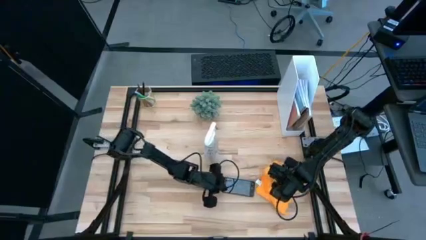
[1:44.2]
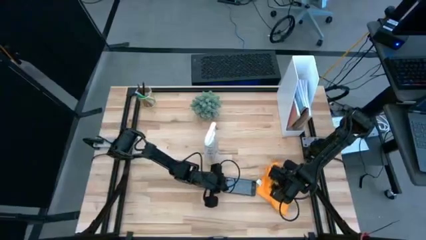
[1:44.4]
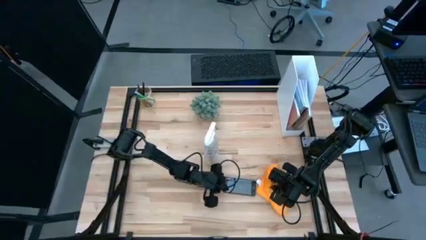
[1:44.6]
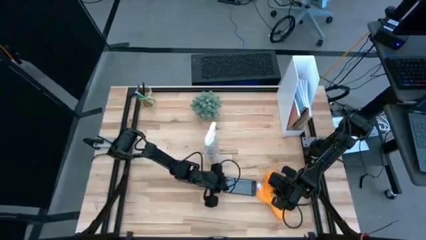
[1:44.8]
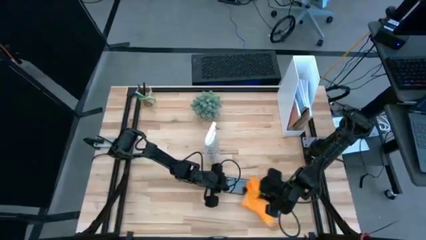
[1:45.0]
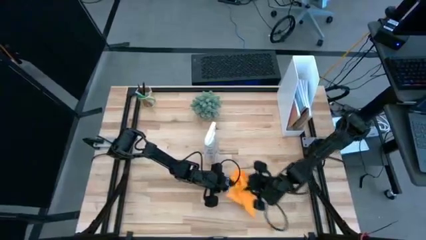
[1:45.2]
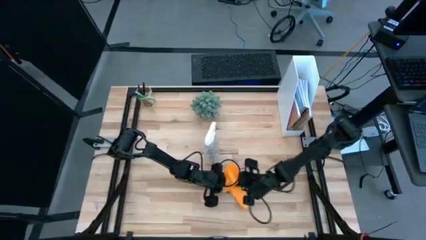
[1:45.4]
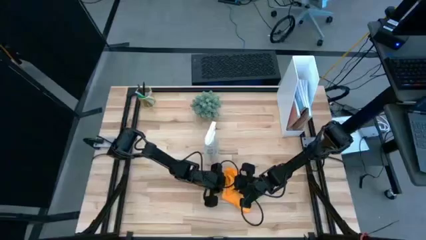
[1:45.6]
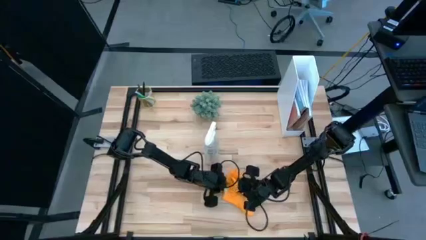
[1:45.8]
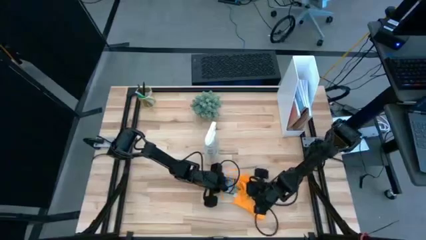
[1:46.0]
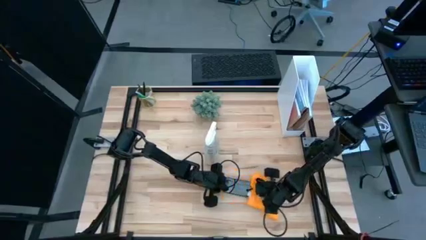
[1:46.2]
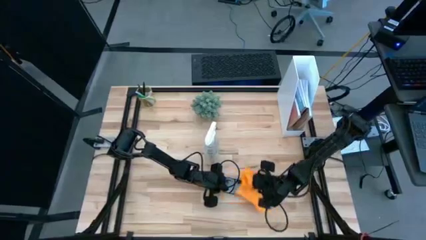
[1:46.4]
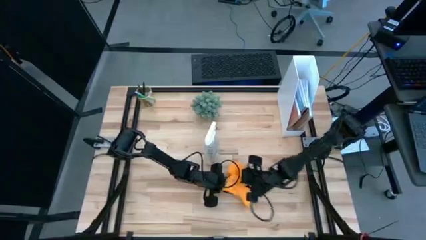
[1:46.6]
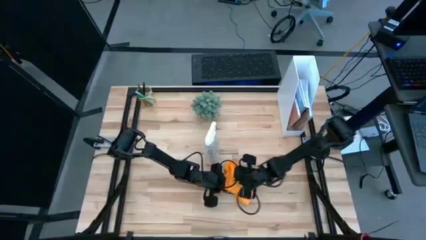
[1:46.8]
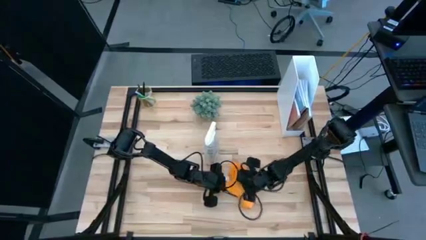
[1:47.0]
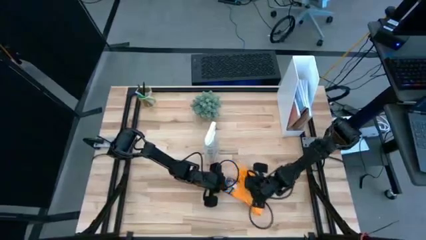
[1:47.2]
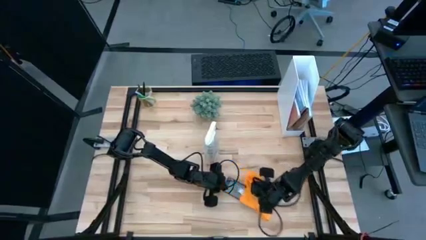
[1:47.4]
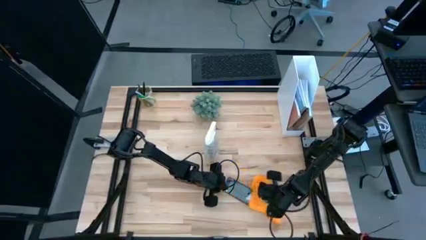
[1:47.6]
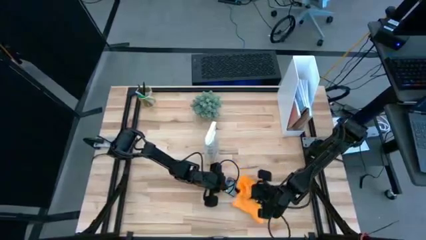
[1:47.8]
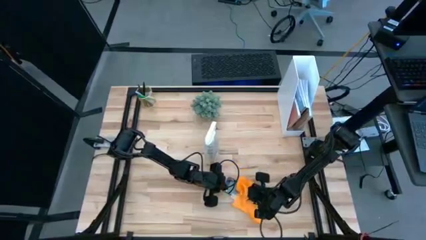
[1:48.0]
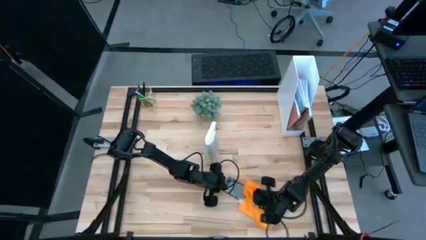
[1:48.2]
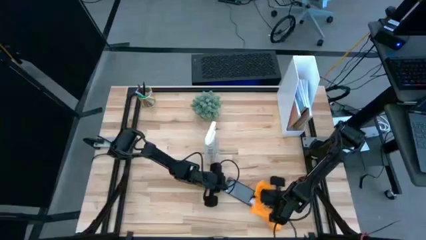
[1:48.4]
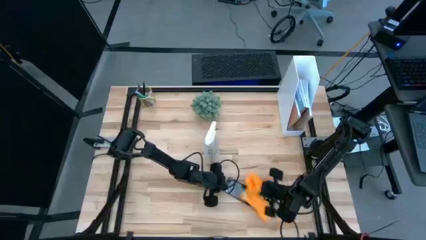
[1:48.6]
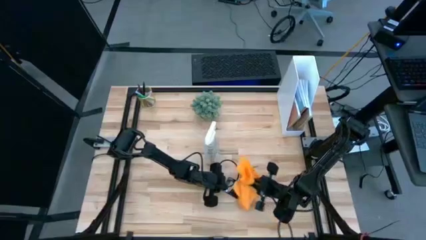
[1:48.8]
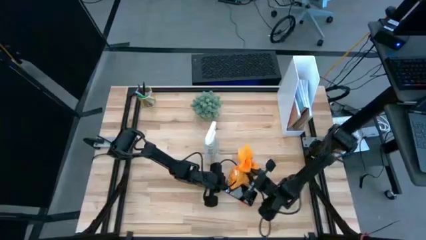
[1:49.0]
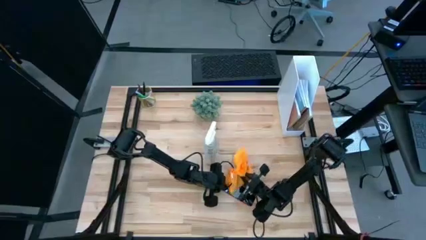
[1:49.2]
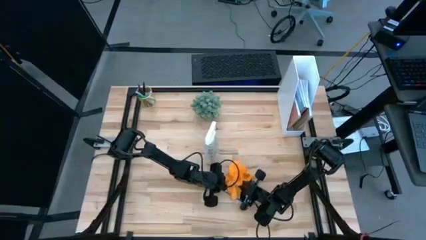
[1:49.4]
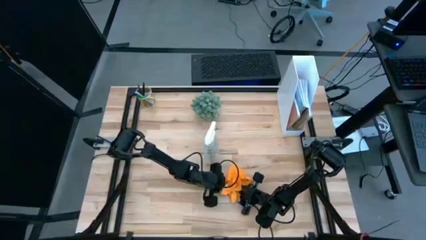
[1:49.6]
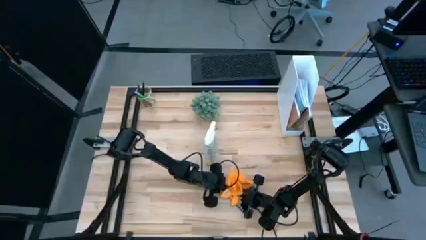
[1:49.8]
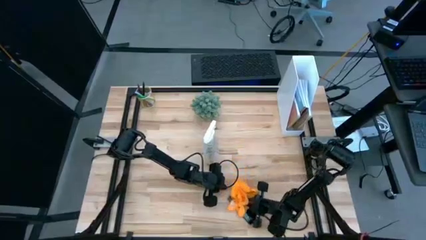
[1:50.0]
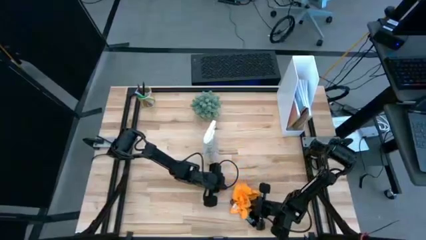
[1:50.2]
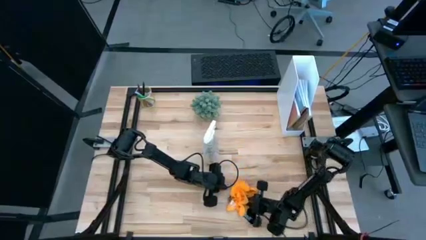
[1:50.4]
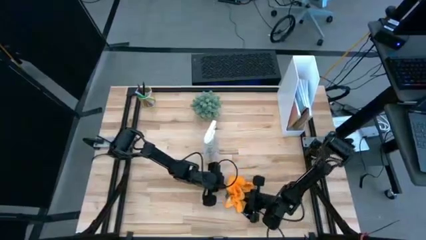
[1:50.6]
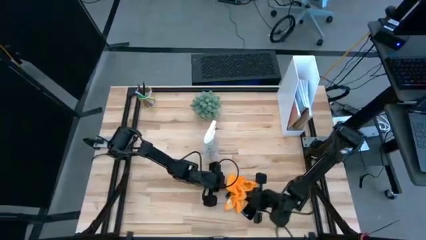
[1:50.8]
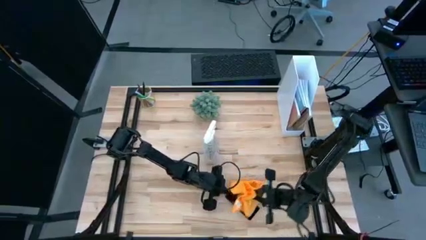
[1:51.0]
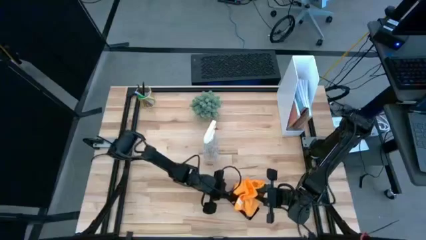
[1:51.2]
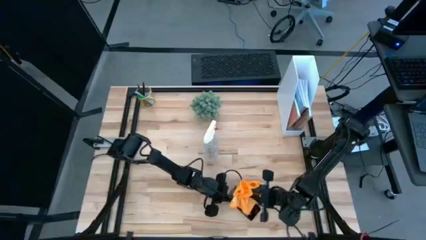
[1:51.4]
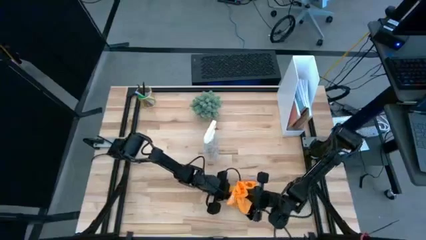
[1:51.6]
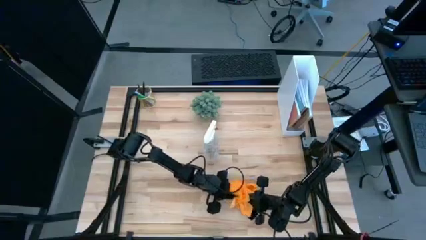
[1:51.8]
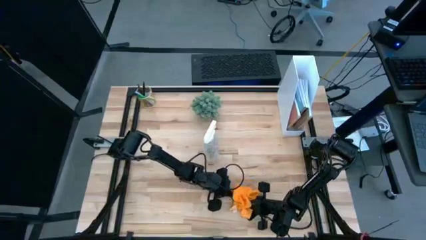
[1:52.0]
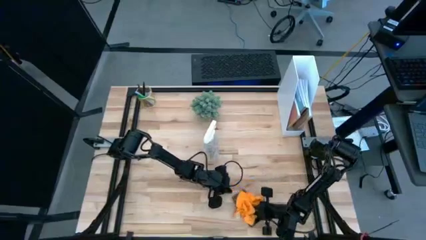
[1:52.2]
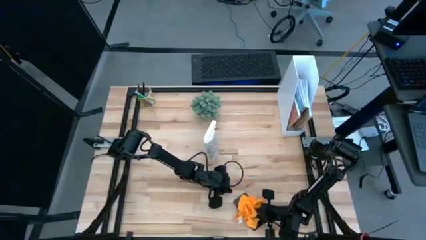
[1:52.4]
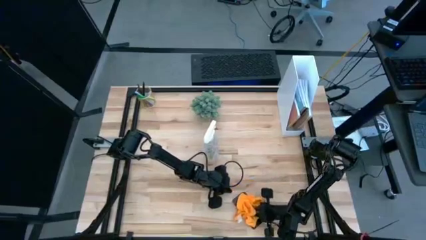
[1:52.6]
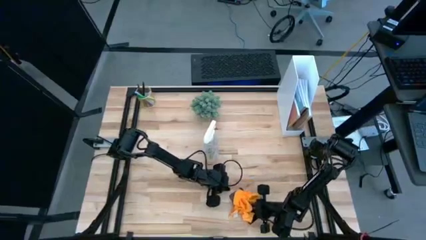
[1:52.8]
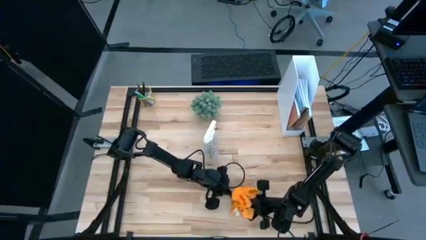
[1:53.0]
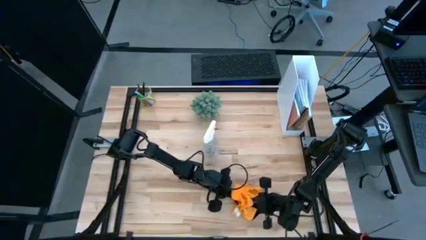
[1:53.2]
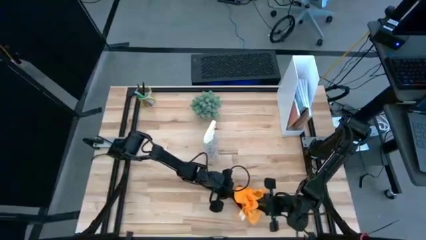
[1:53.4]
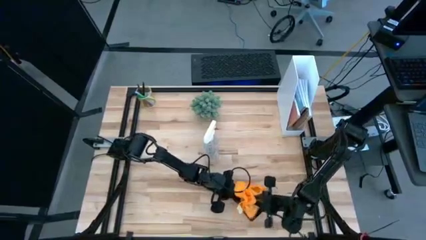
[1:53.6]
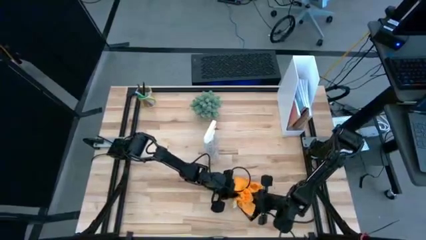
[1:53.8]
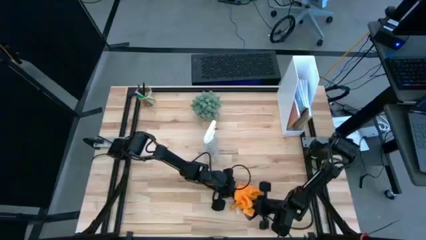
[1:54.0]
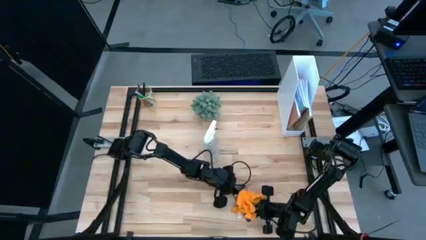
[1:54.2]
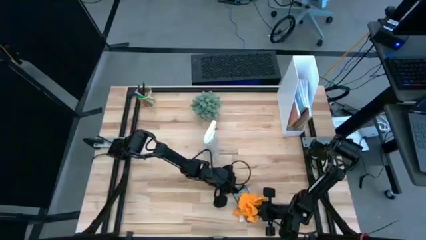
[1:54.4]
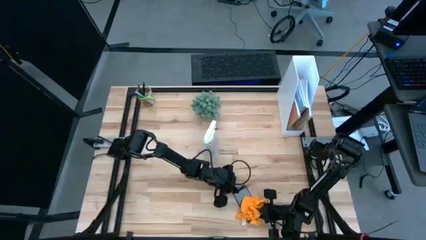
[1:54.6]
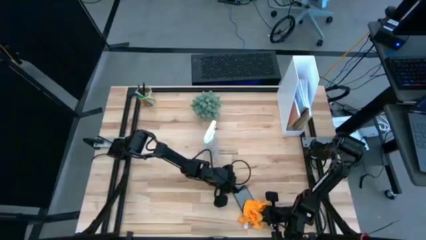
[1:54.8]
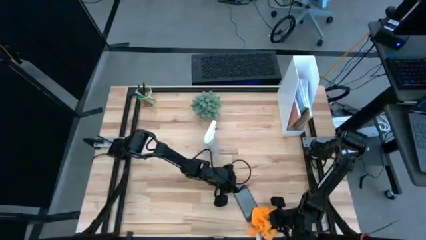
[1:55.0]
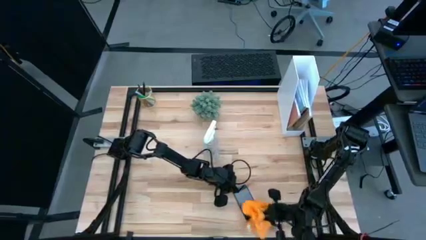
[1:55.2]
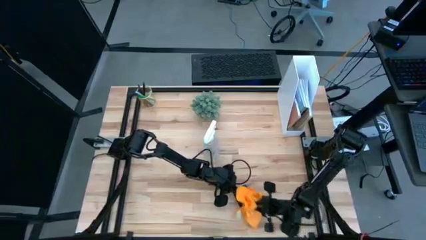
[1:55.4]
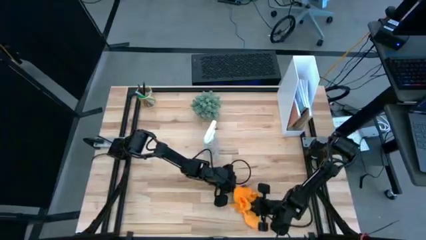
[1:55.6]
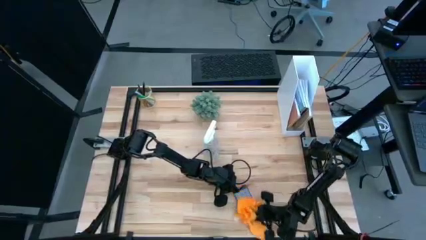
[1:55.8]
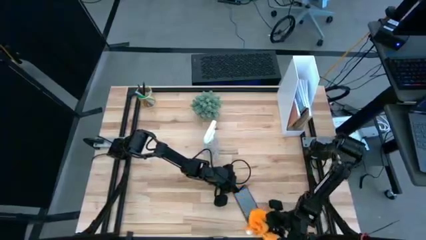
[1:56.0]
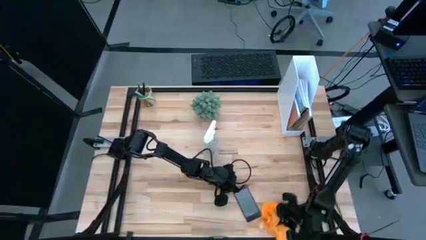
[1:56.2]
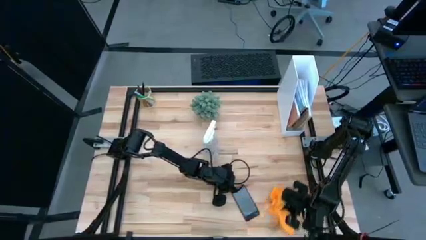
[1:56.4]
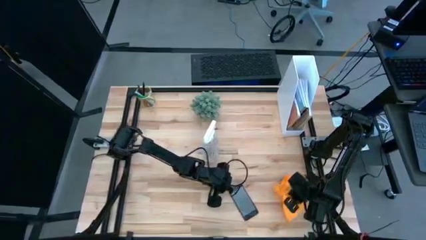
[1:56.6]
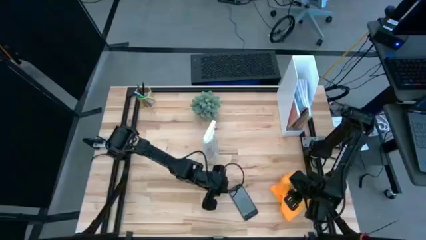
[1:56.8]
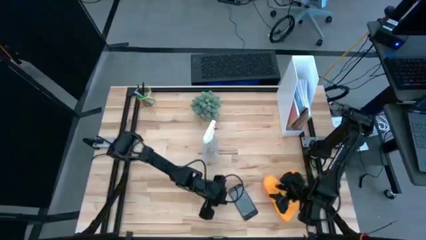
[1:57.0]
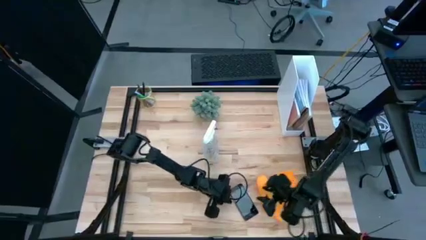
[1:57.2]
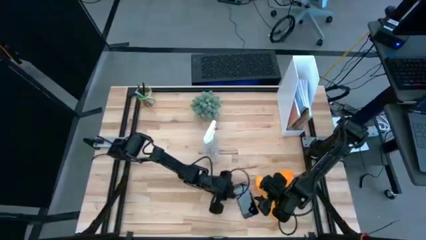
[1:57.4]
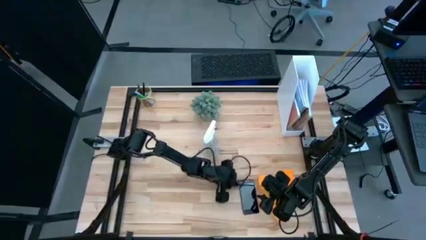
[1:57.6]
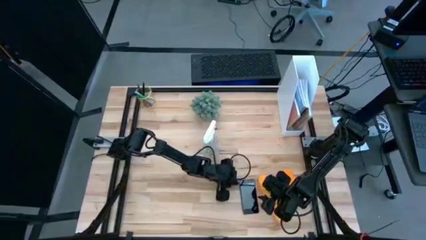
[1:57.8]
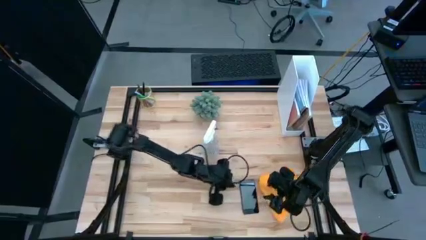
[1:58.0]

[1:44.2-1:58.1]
Task: Apply microfiber cloth
Wipe the back and front of the cellphone with the yellow microfiber cloth
